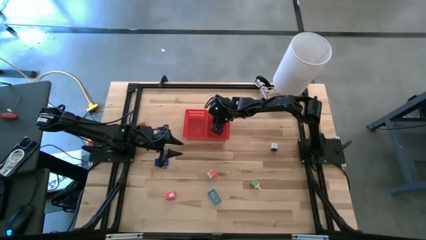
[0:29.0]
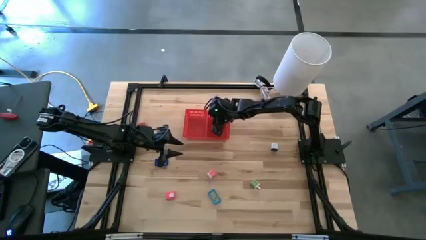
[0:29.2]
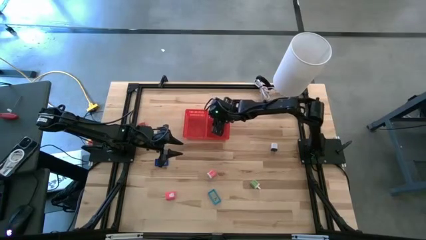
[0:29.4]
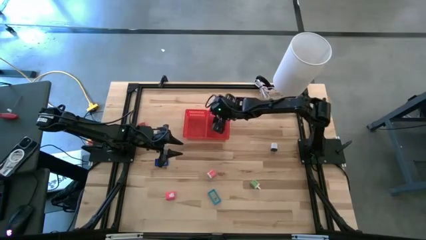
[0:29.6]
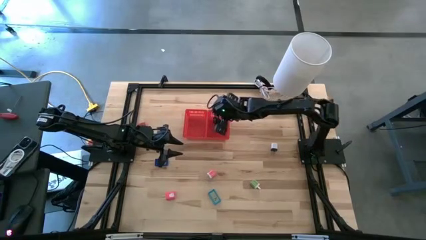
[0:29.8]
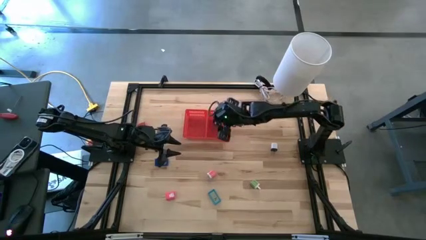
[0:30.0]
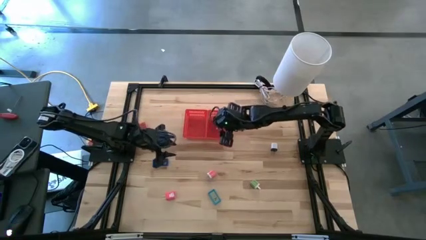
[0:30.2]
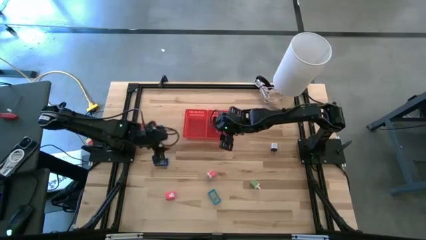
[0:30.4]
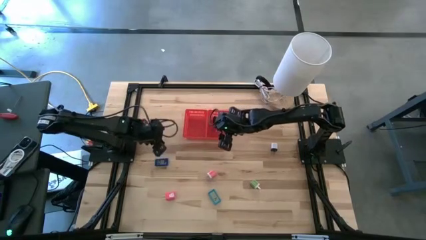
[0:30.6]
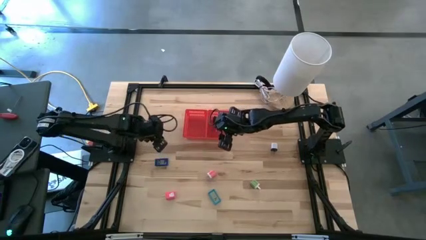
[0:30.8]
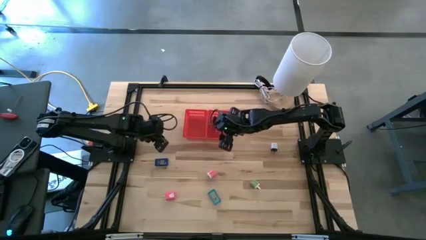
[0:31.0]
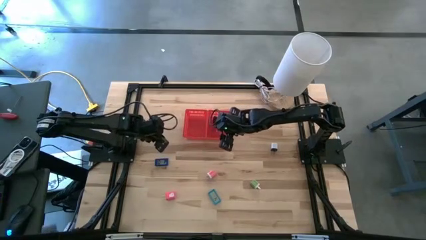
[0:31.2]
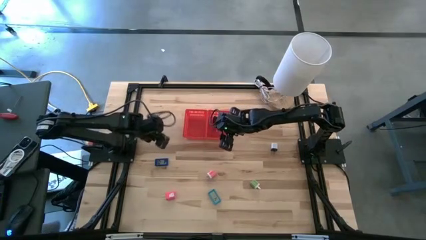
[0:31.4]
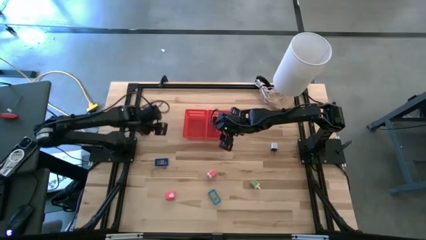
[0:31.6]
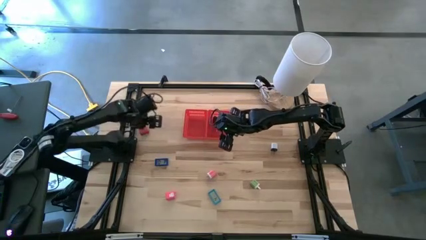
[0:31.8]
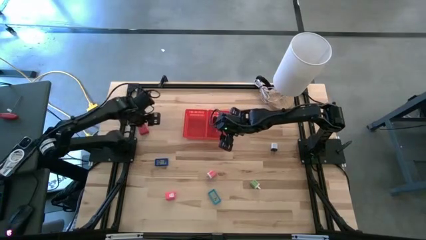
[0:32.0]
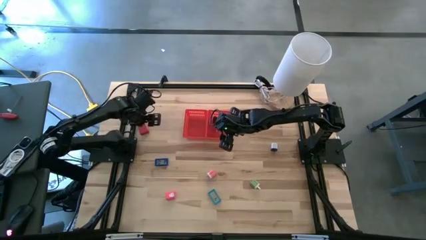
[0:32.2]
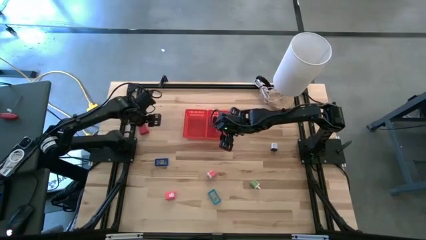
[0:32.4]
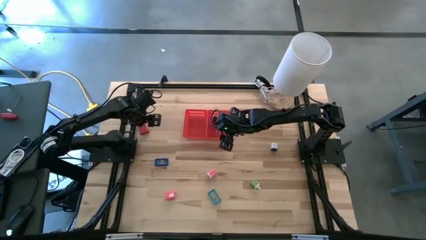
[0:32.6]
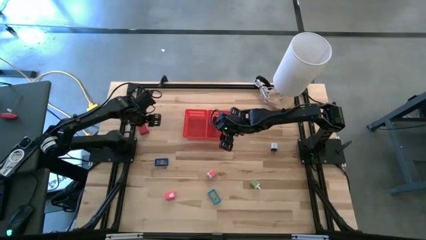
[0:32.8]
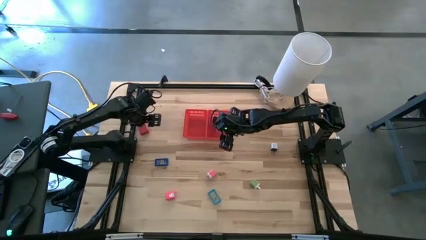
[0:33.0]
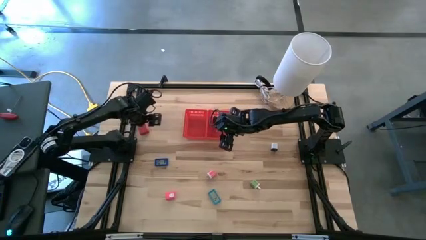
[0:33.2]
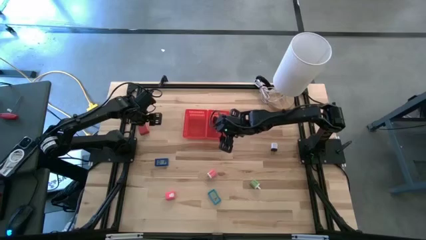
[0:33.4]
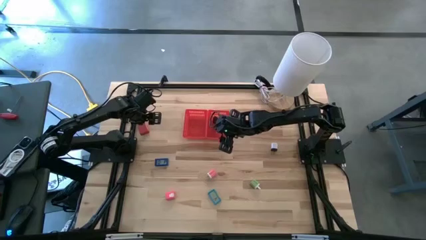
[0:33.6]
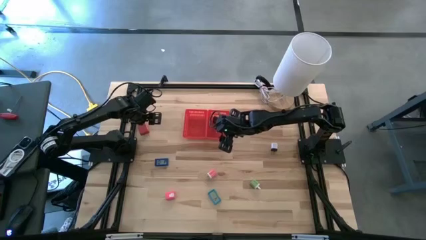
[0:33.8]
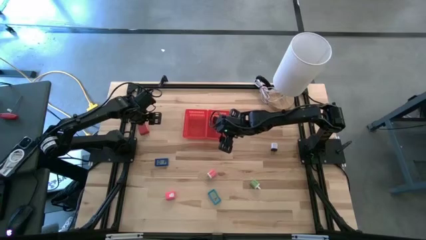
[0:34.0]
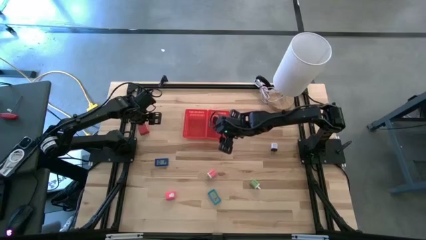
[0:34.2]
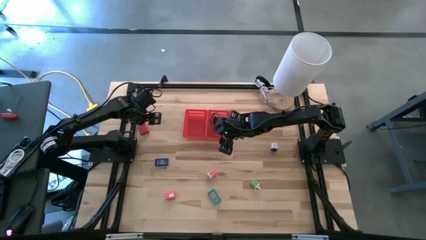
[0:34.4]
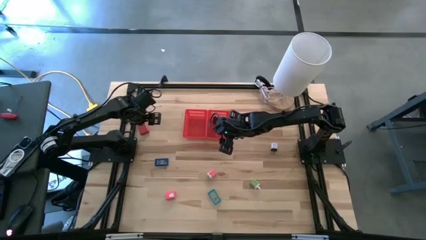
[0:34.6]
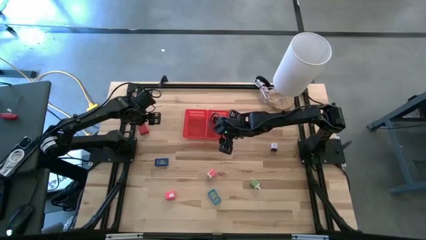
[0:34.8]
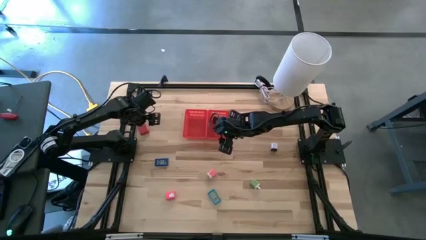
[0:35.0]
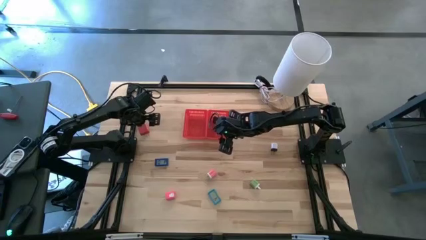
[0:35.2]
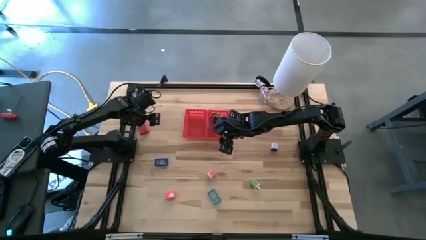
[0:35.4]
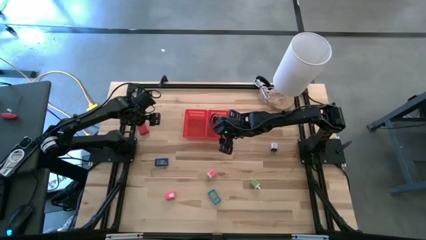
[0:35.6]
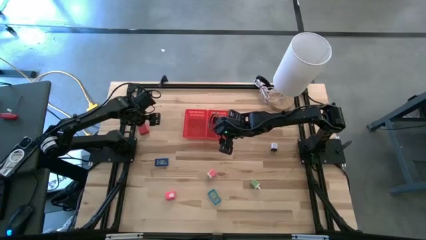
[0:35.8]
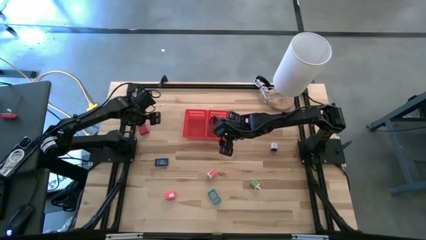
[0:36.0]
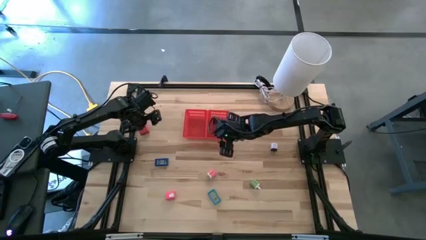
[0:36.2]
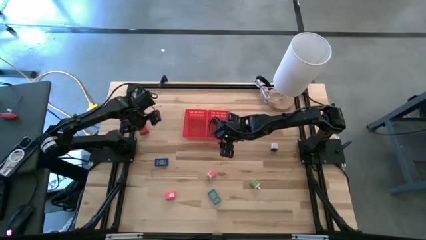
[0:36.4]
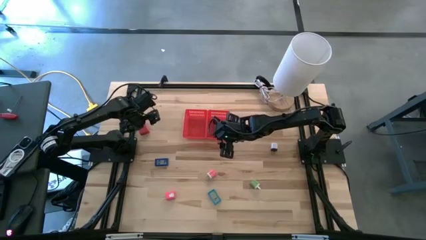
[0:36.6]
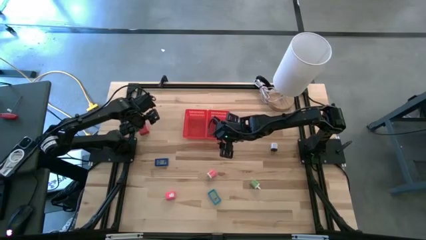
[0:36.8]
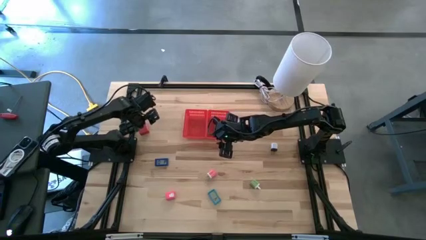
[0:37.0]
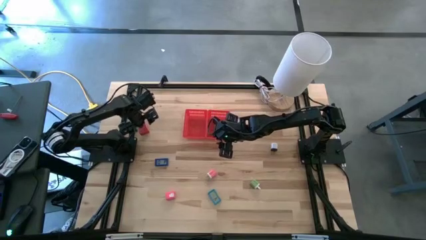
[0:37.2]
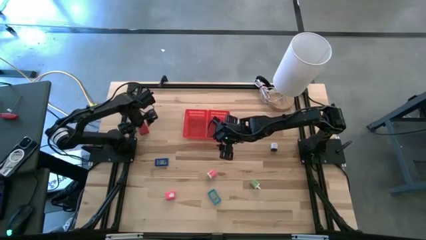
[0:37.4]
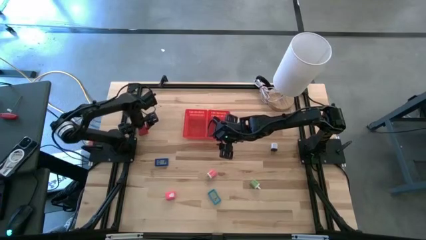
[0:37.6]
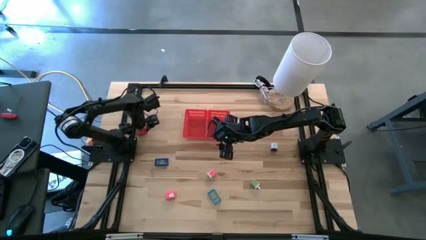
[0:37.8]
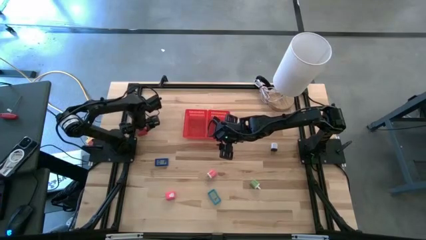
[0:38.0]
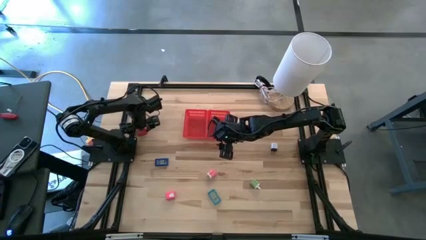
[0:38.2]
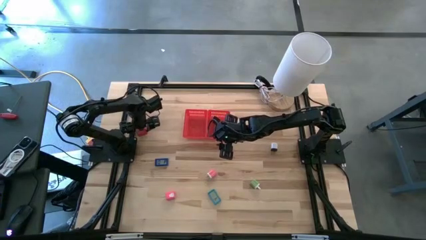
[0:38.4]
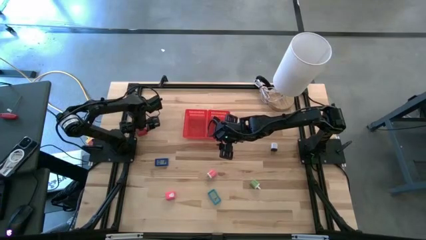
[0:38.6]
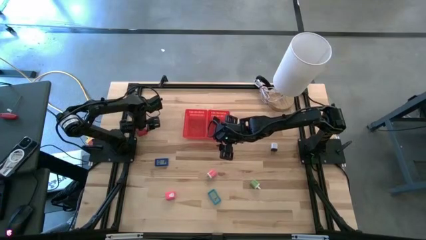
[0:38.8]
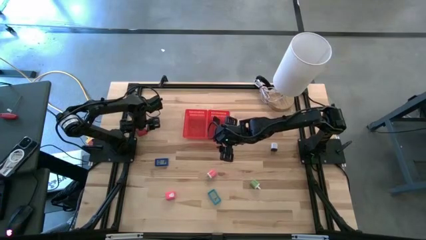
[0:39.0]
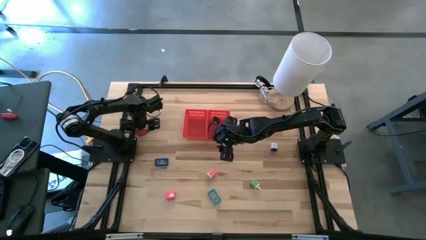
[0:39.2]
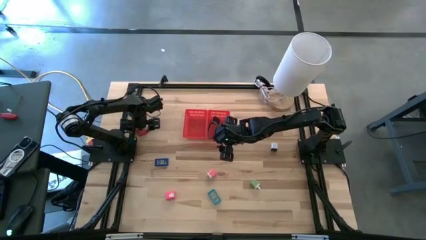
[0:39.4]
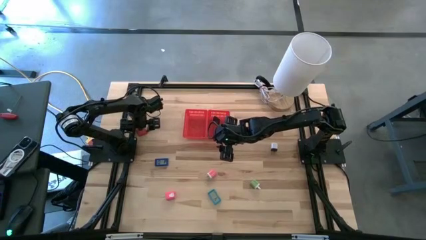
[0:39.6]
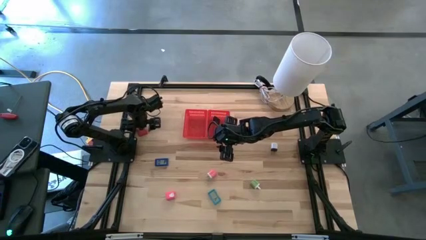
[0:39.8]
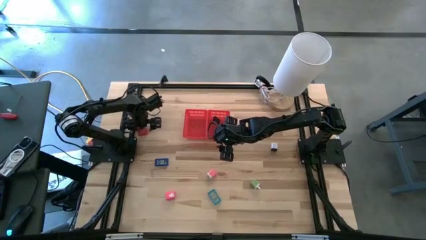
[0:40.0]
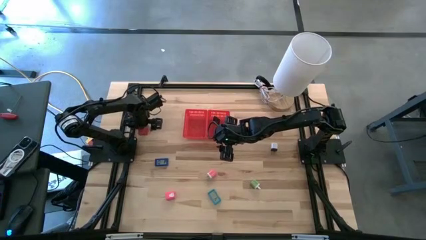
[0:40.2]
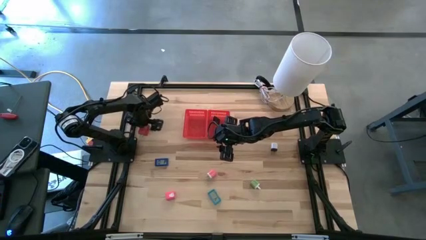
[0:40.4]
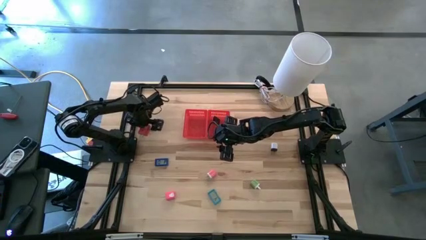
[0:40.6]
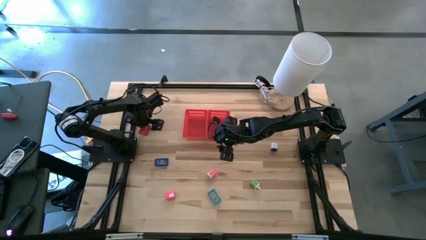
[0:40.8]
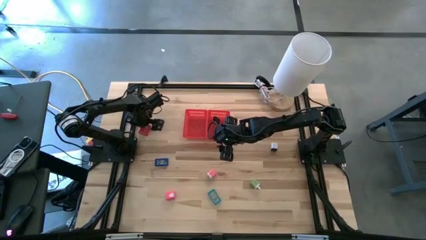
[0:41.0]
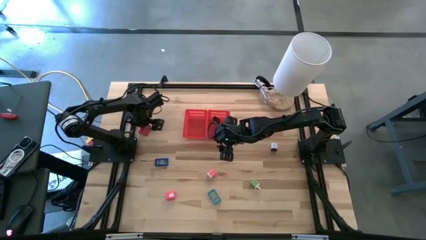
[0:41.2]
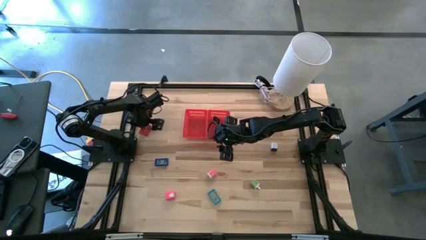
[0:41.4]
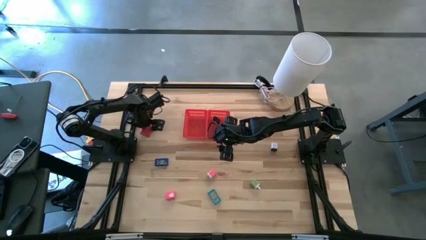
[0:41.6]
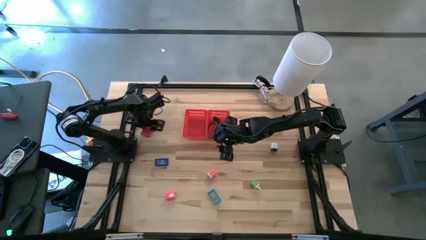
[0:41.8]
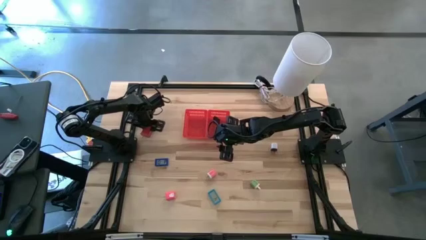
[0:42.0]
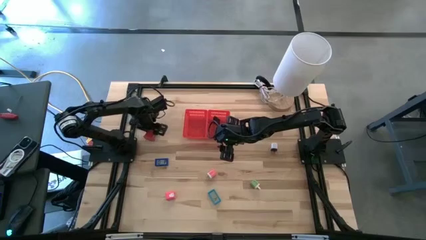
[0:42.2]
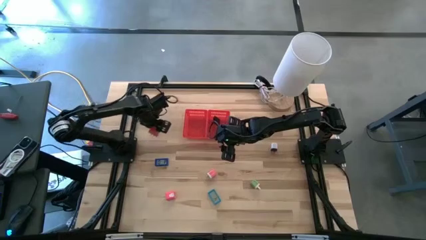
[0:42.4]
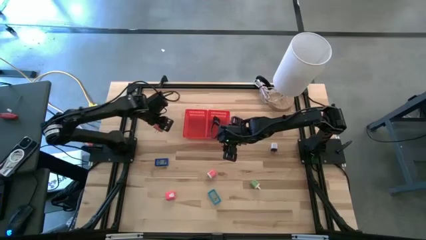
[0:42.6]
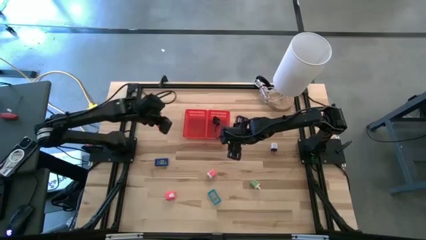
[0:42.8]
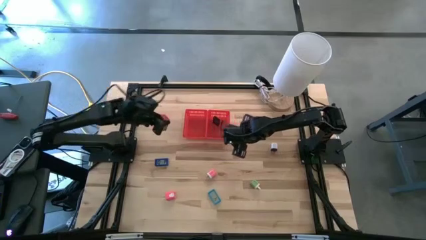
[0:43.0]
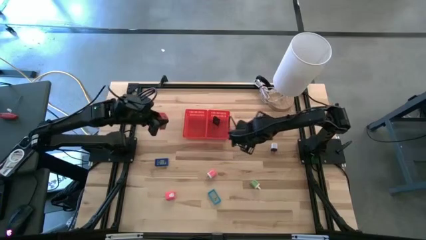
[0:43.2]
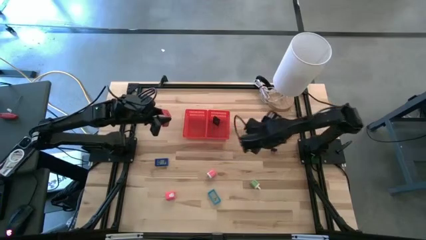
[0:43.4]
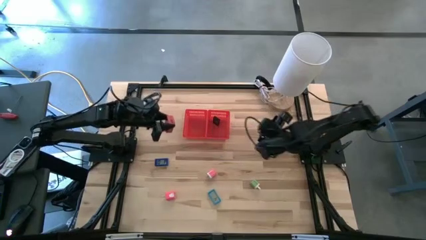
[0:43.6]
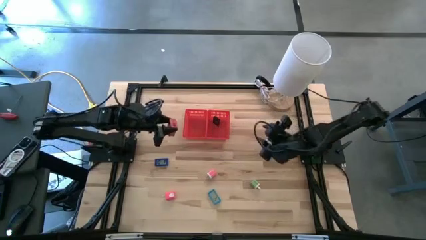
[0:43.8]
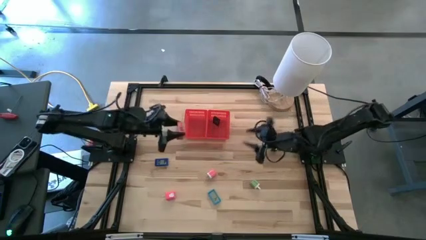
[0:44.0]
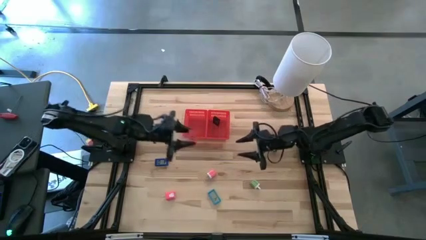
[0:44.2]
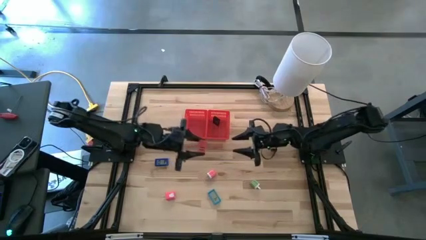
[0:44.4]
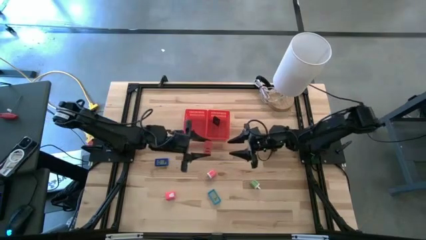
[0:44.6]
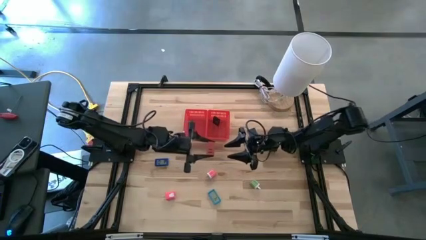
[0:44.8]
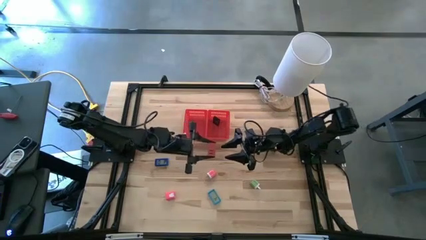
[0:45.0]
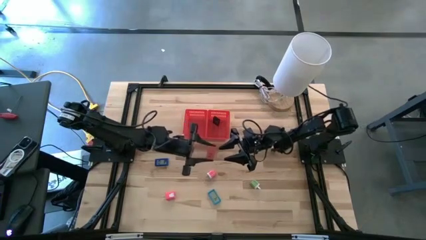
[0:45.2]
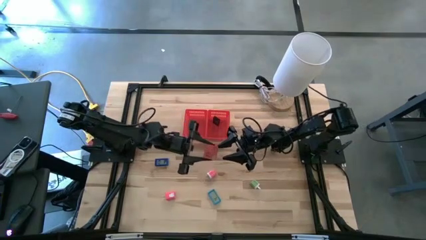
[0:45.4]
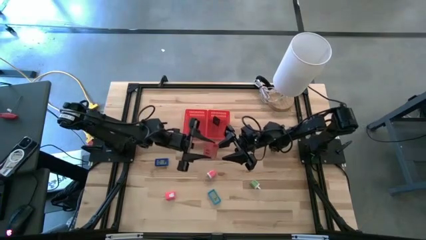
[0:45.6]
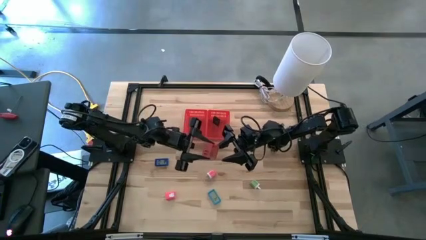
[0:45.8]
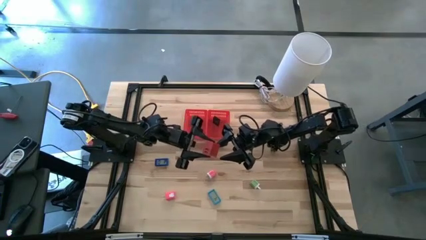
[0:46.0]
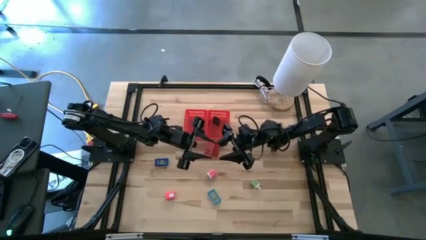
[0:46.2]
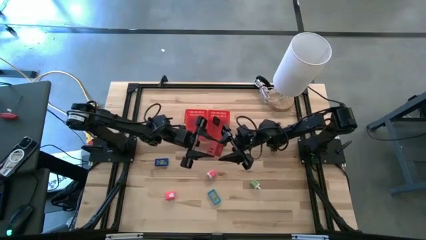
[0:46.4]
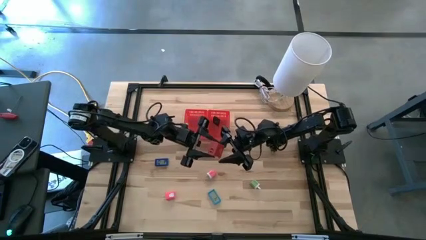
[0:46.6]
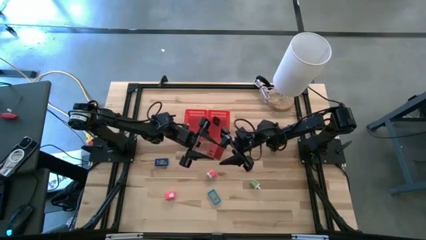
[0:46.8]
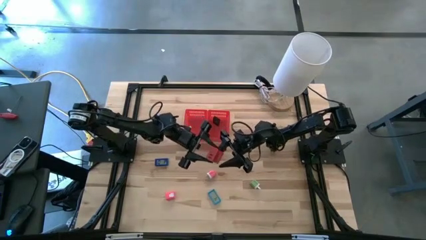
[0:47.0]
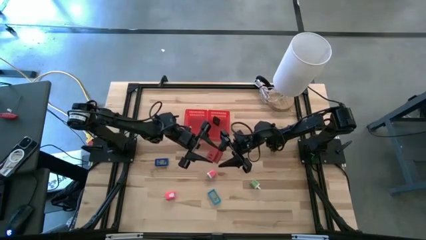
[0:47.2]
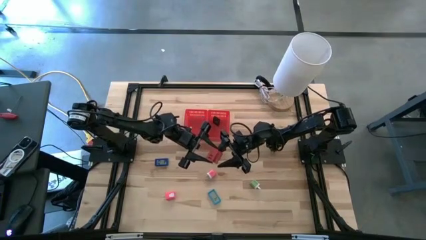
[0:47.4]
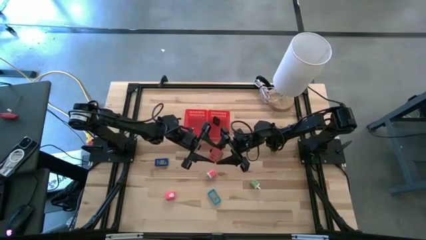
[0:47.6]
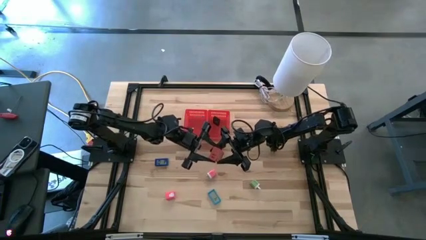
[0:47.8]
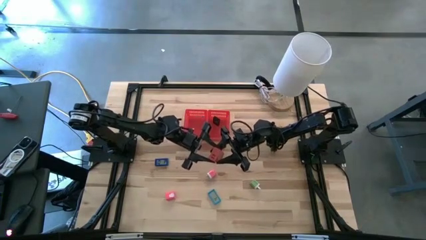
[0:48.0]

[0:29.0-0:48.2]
Task: Pick & Place Office items
Put the red charger adapter into the left red bin
